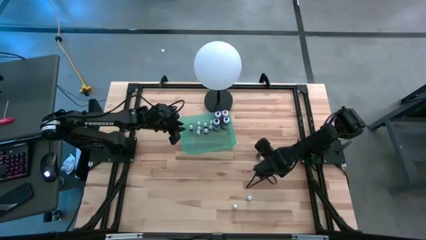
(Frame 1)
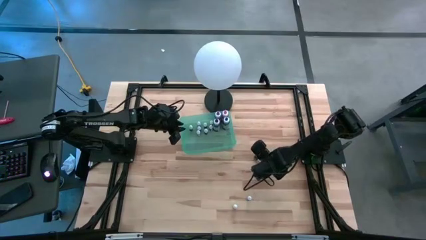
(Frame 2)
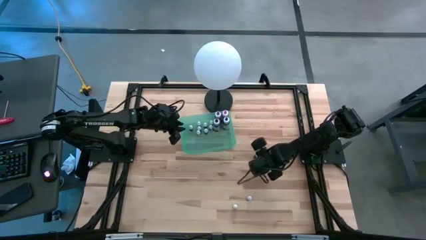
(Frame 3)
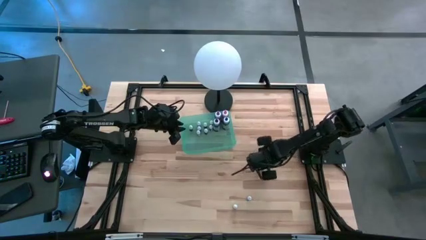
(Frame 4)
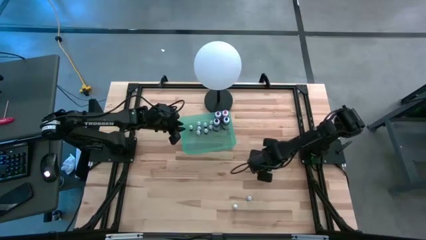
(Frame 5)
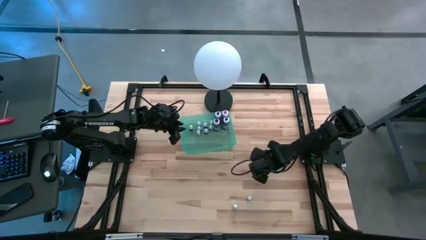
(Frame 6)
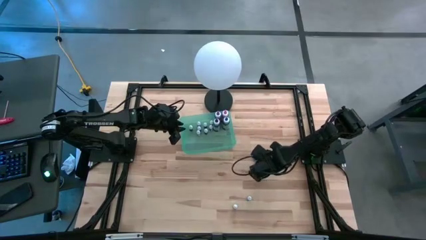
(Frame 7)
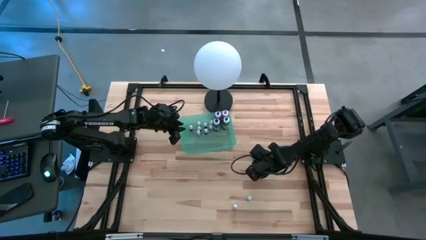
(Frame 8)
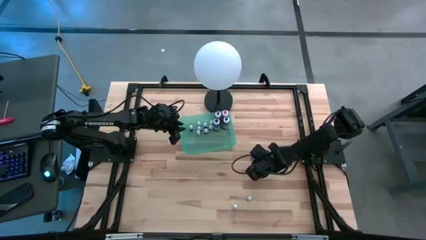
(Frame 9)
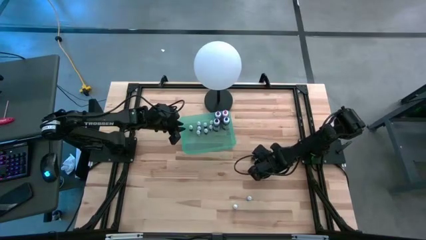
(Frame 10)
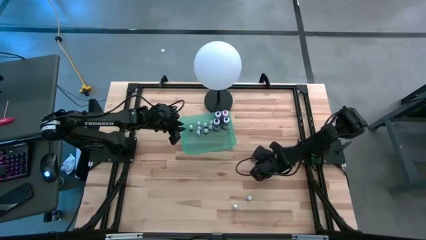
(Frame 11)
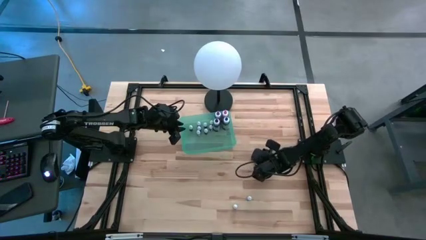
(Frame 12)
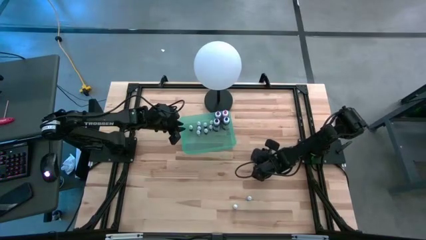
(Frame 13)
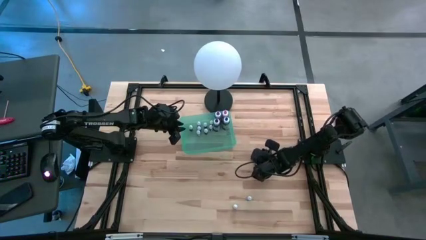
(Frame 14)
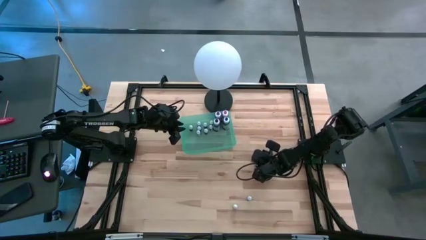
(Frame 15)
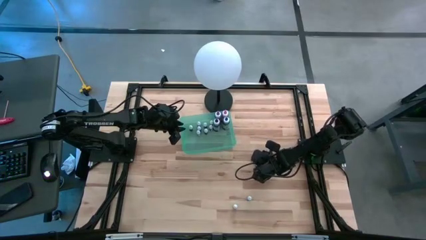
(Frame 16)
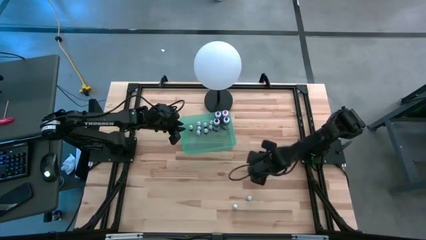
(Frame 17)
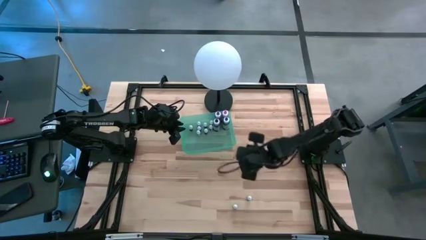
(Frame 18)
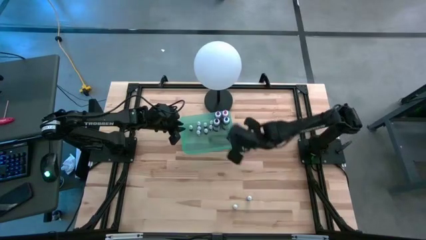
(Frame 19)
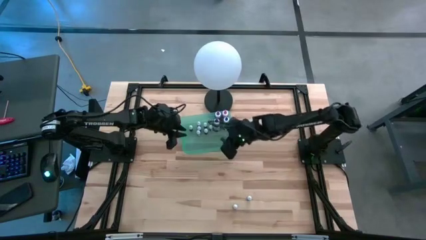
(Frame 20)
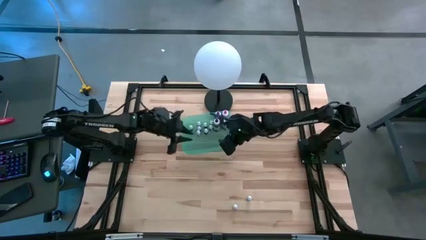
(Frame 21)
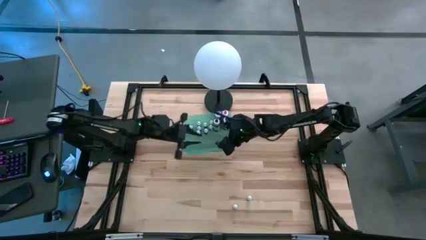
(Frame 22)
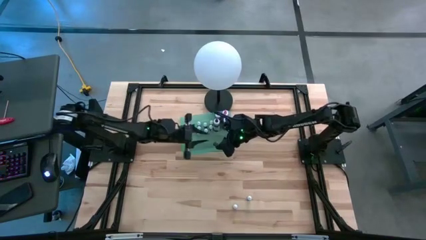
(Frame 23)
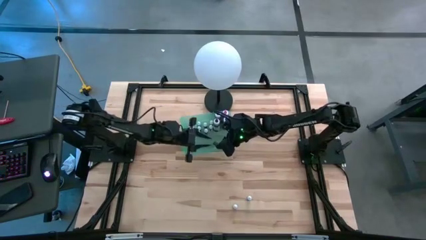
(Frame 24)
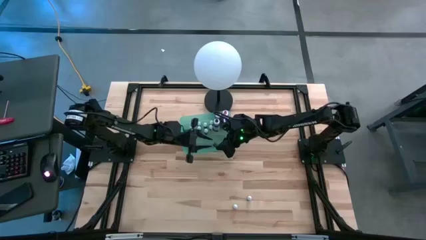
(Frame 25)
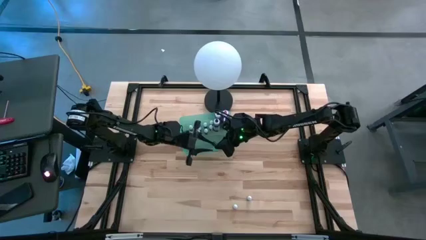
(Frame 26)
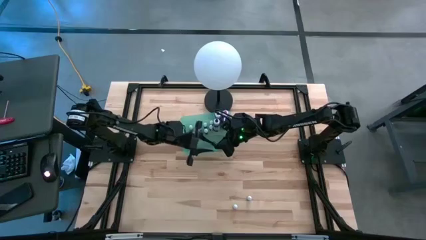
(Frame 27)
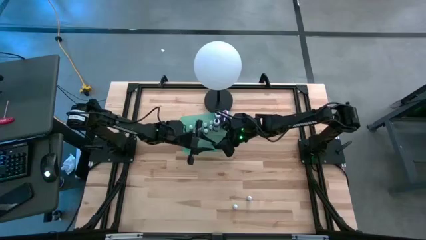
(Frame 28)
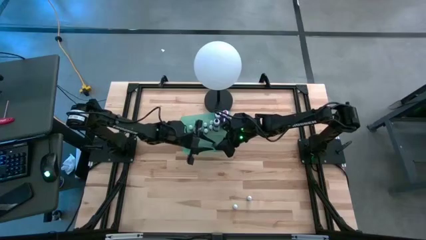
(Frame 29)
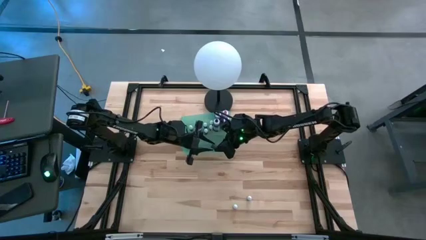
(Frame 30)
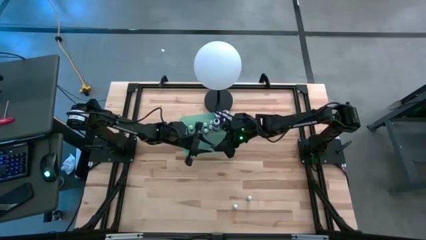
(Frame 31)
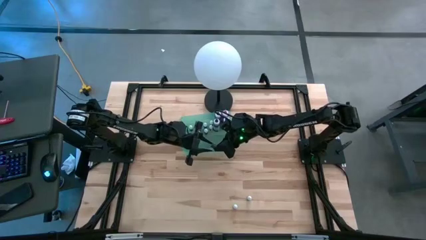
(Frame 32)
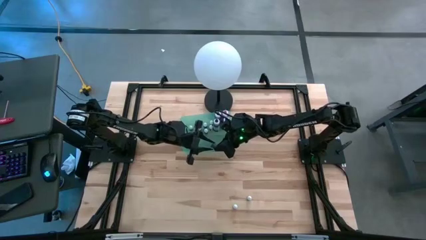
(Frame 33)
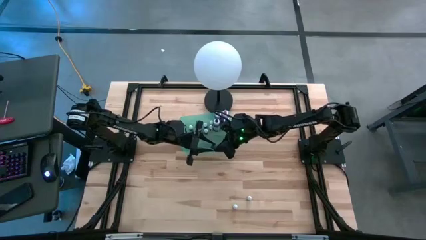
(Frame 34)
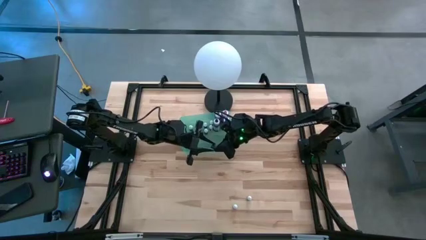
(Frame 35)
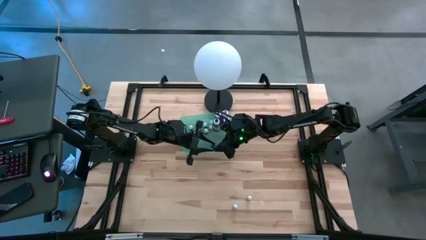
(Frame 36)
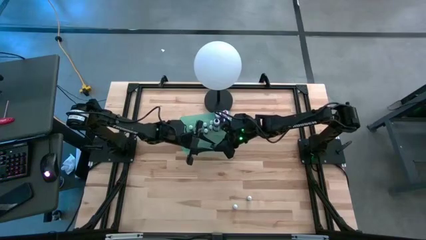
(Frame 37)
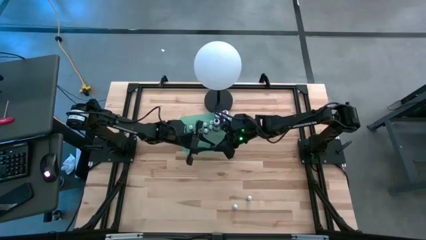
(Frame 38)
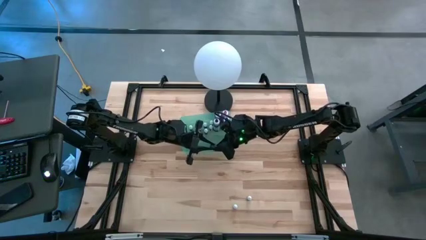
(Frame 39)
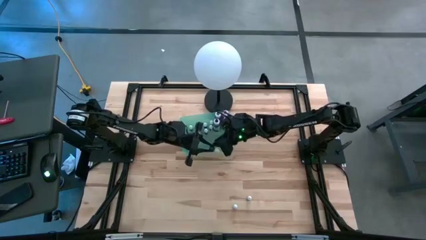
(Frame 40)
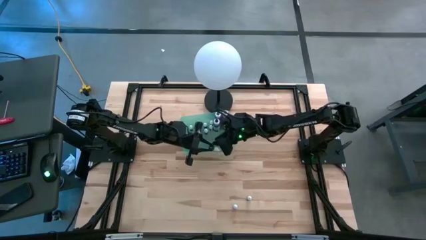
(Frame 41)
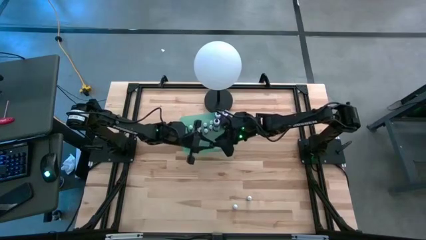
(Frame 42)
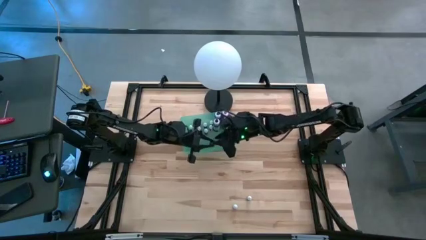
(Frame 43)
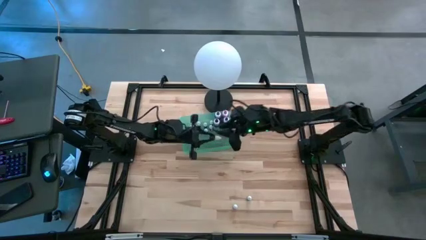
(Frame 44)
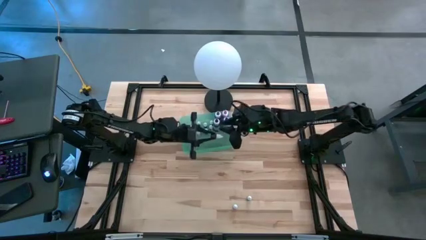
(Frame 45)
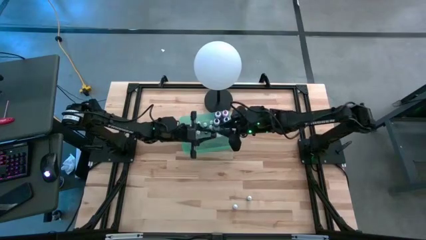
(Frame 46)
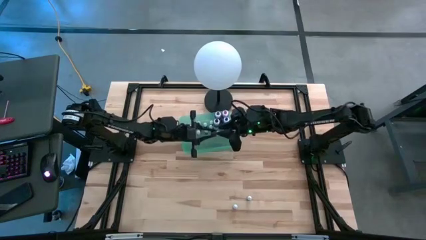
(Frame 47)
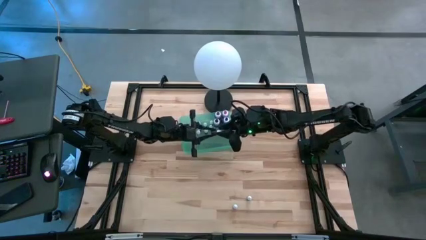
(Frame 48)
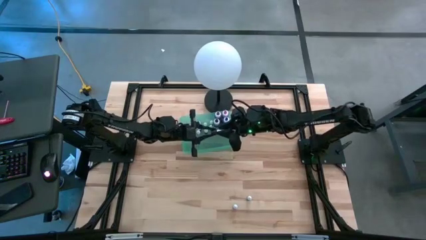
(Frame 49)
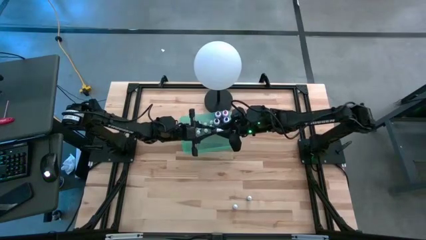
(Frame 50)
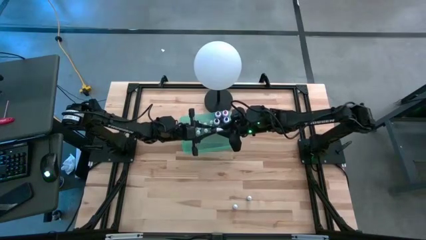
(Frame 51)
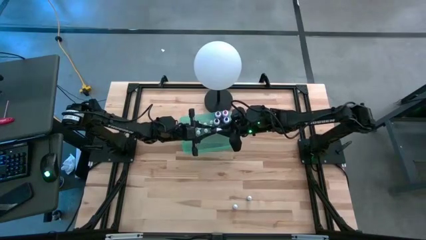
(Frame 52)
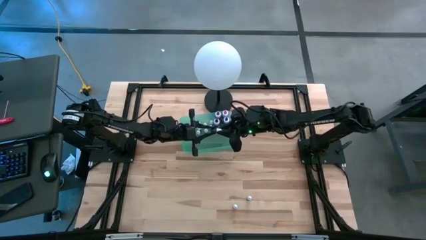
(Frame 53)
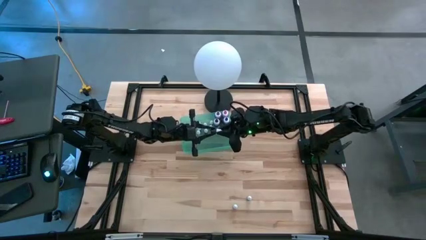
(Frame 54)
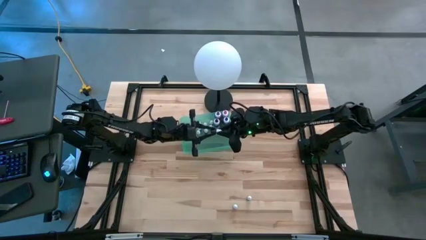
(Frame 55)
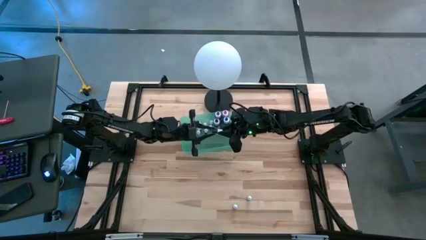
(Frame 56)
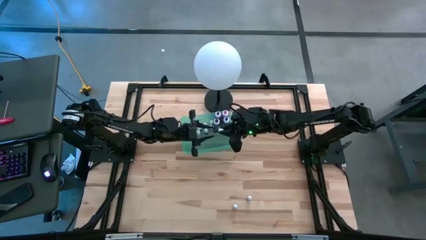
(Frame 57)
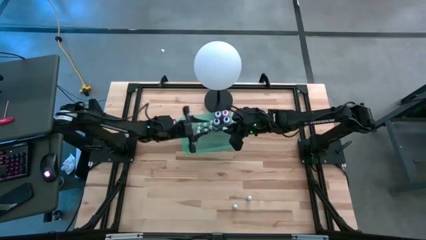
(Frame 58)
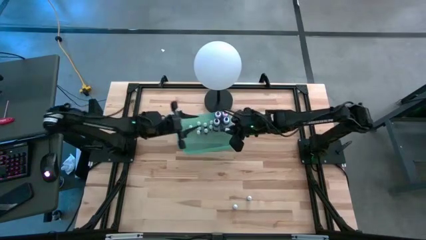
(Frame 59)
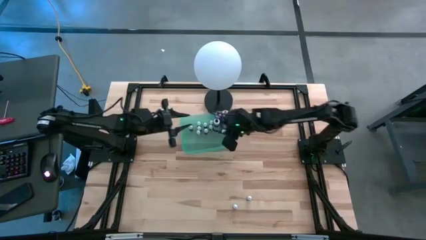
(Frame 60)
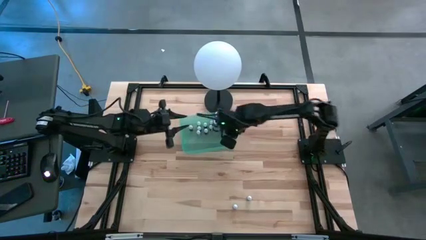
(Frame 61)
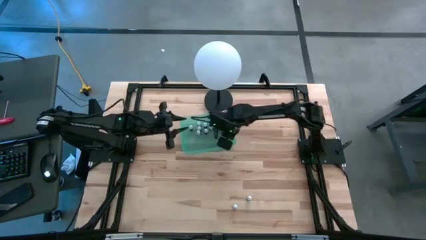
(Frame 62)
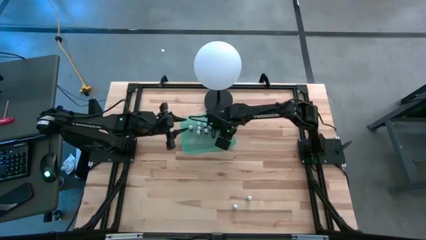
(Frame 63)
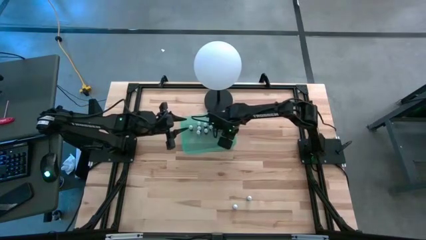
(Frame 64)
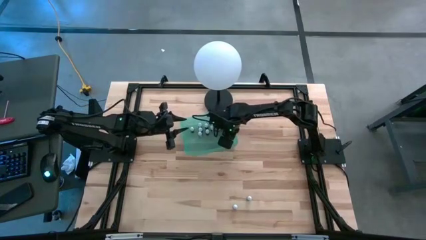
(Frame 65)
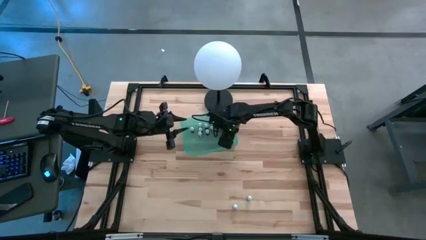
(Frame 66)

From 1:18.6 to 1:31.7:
Task: Pick & Place food coloring
Put the small purple food coloring bottle into the green bin

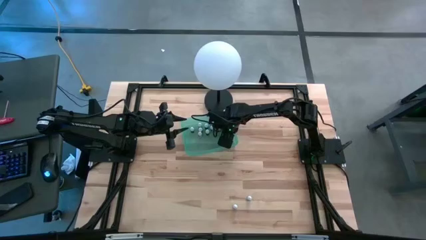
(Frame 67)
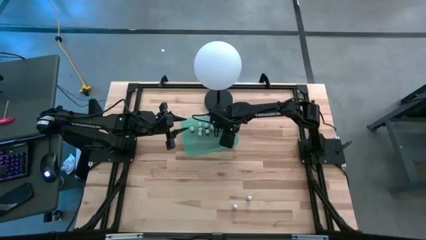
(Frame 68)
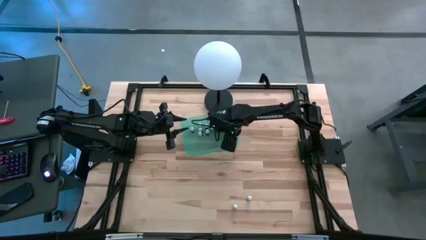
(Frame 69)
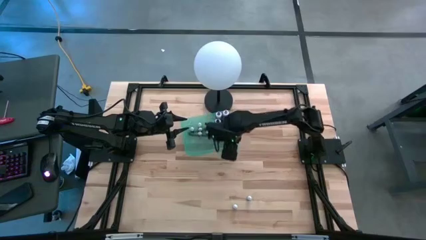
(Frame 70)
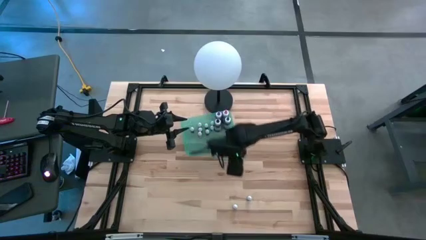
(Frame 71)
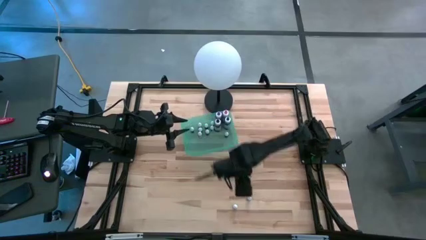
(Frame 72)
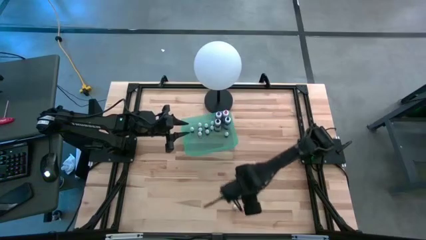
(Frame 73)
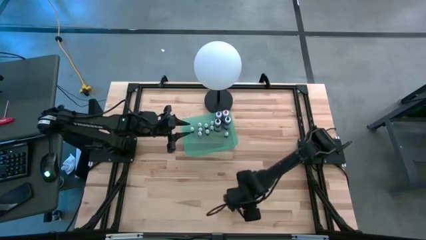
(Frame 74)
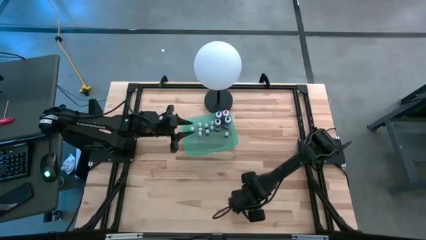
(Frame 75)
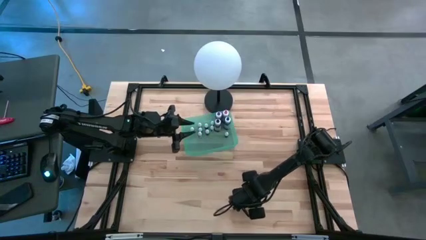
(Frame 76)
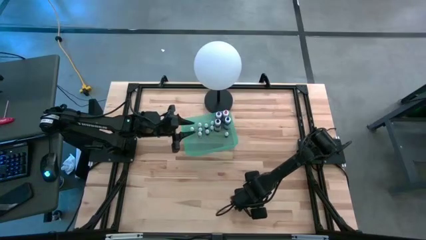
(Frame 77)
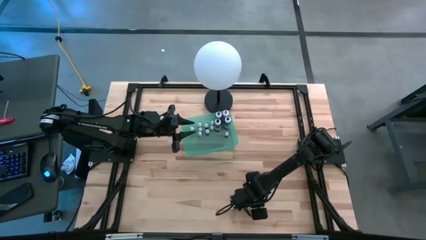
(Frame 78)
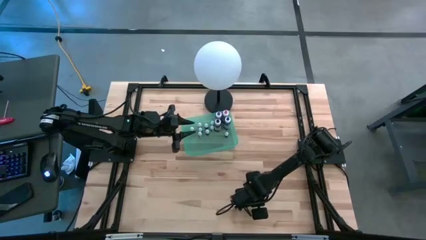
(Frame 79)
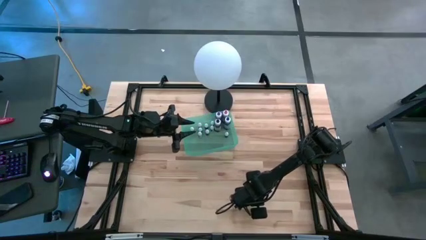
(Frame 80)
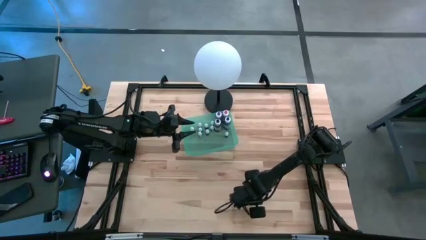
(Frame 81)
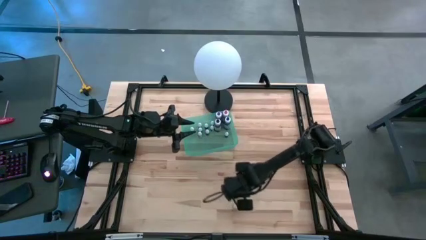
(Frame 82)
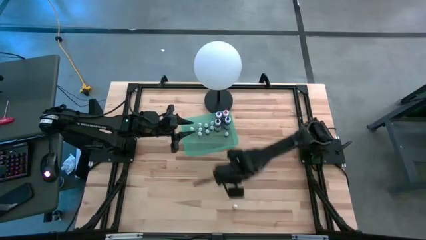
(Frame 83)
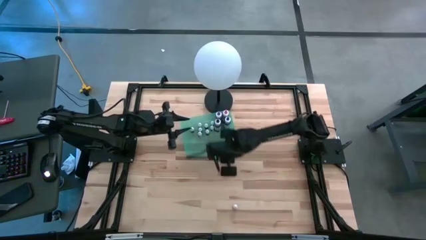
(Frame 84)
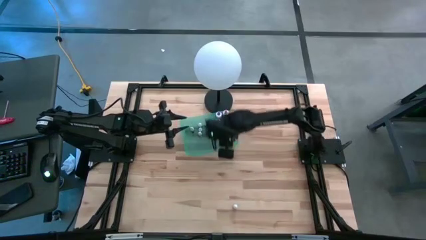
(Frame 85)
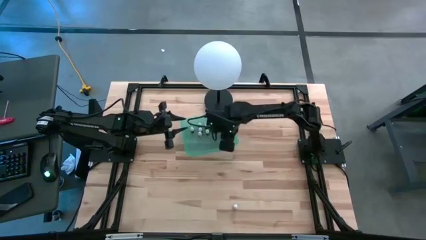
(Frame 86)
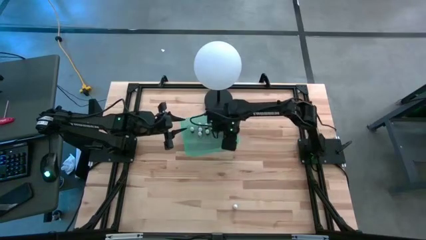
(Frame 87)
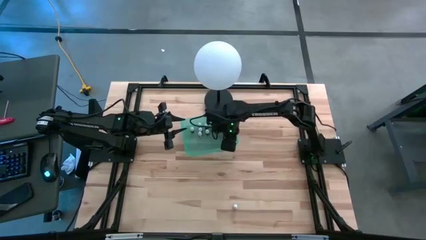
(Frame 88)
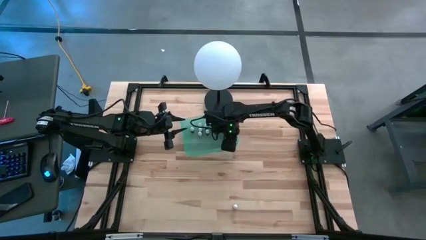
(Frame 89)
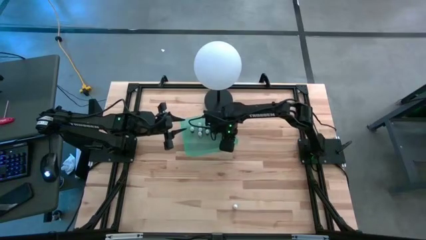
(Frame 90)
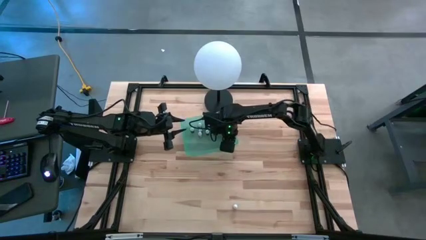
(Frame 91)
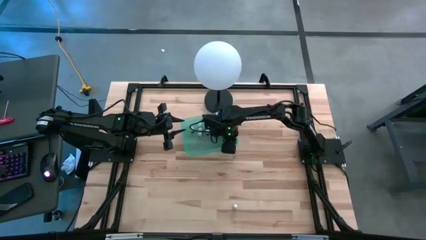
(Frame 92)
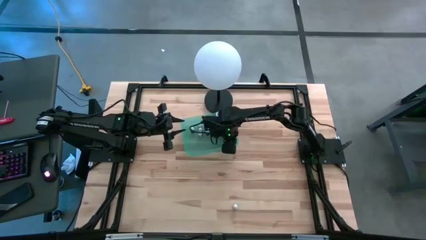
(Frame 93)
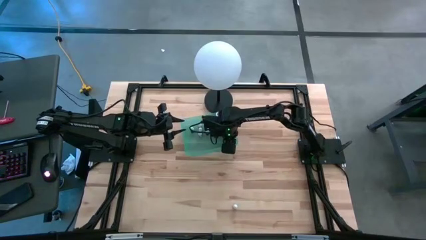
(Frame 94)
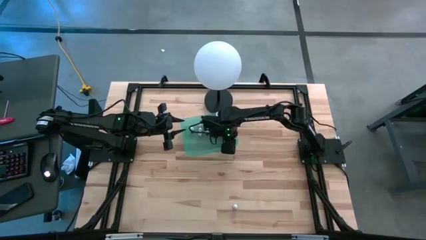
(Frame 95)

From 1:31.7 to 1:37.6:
Put the small blue food coloring bottle into the green bin
